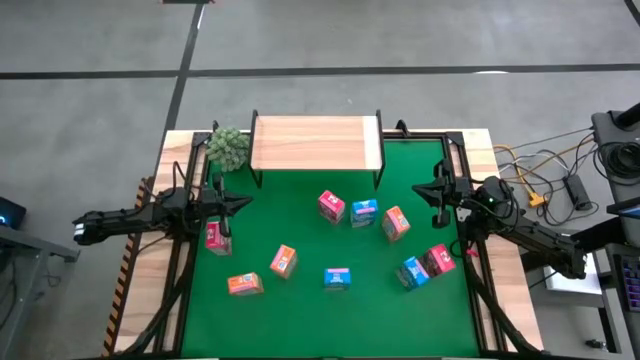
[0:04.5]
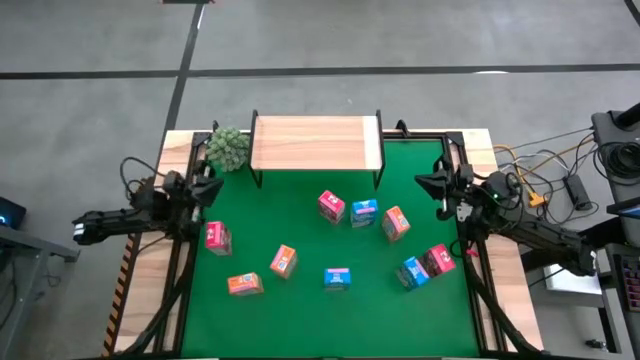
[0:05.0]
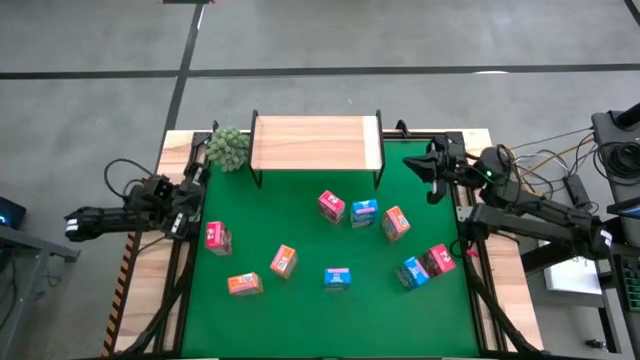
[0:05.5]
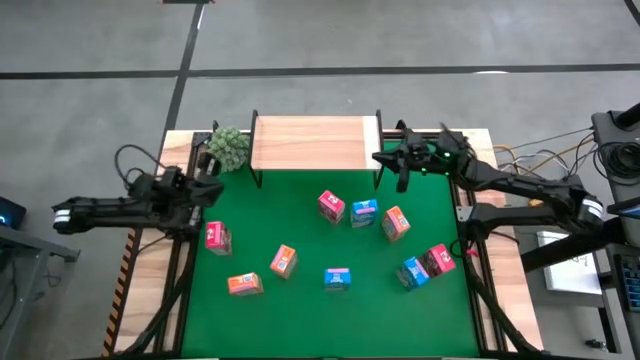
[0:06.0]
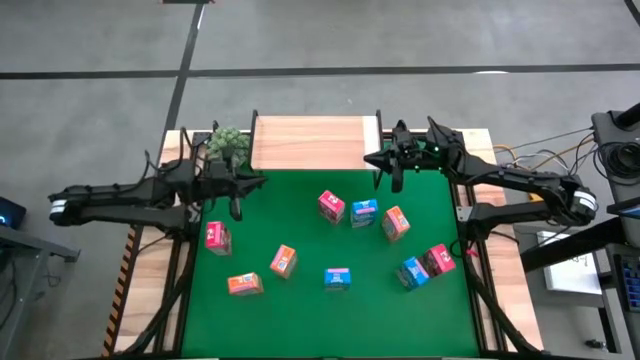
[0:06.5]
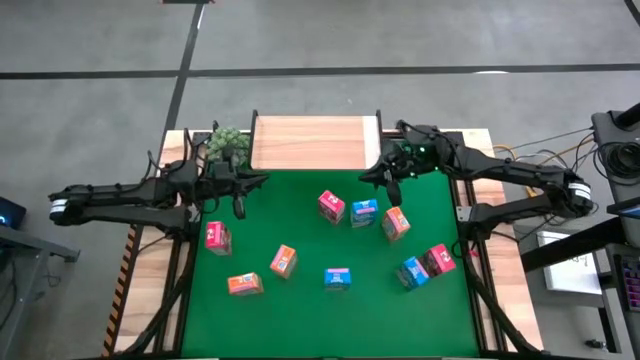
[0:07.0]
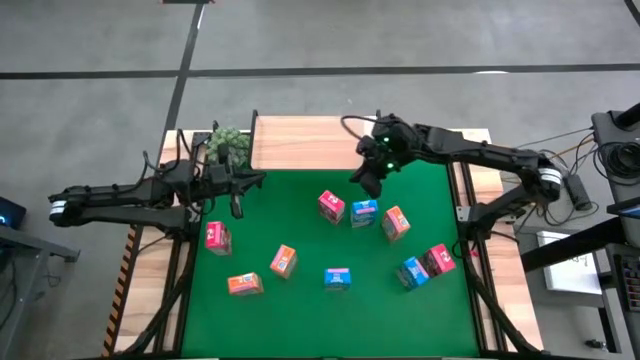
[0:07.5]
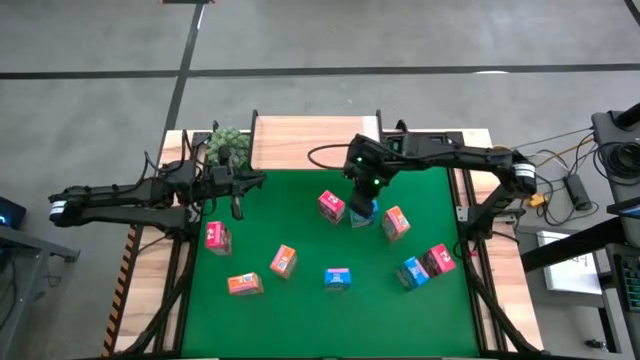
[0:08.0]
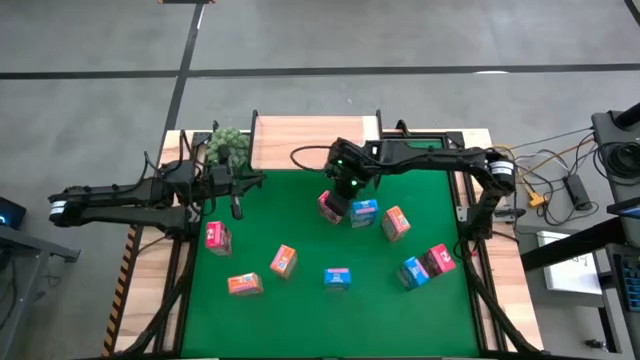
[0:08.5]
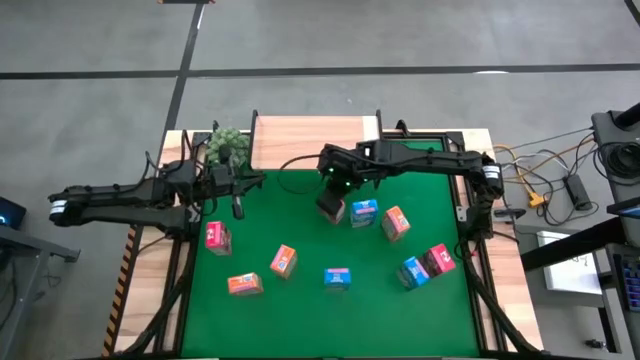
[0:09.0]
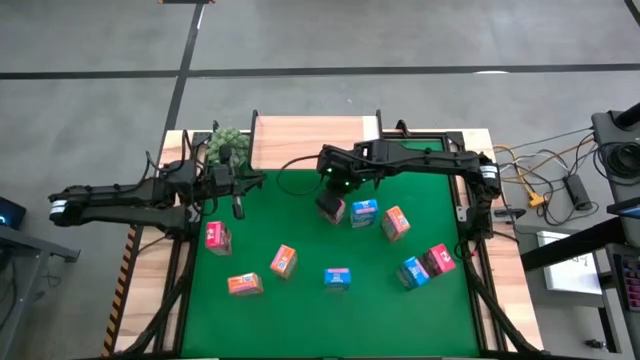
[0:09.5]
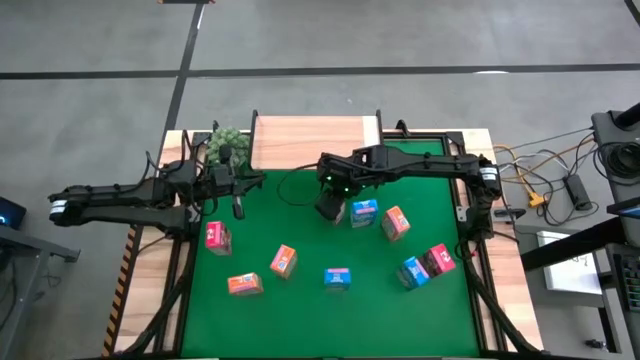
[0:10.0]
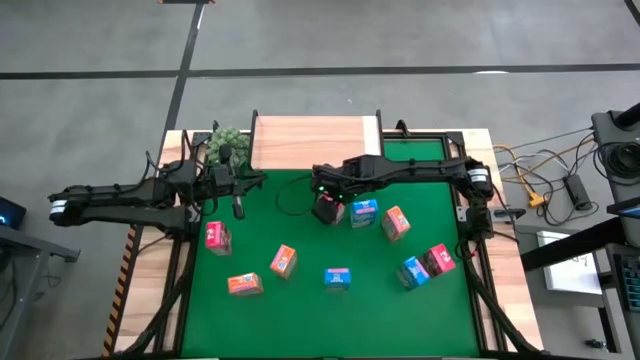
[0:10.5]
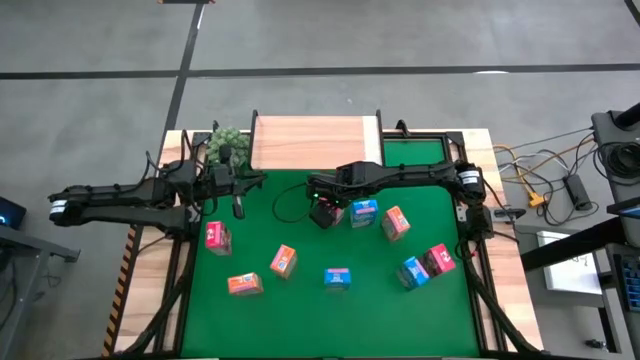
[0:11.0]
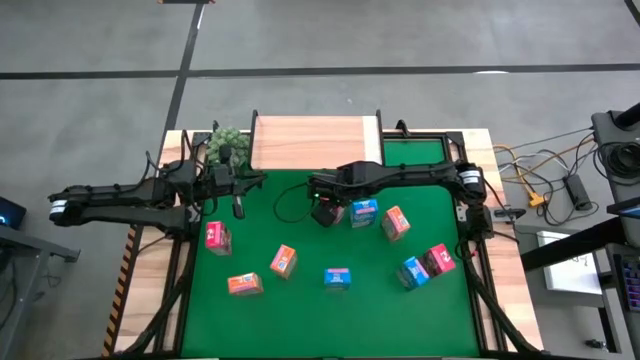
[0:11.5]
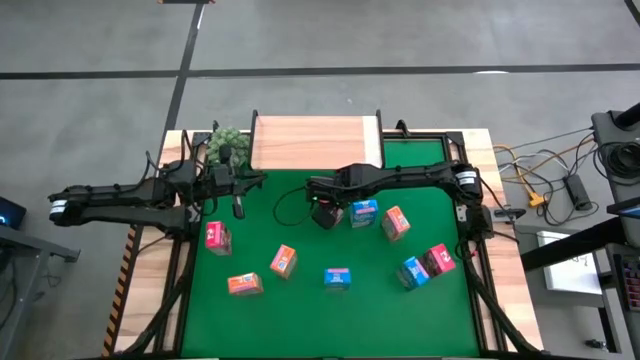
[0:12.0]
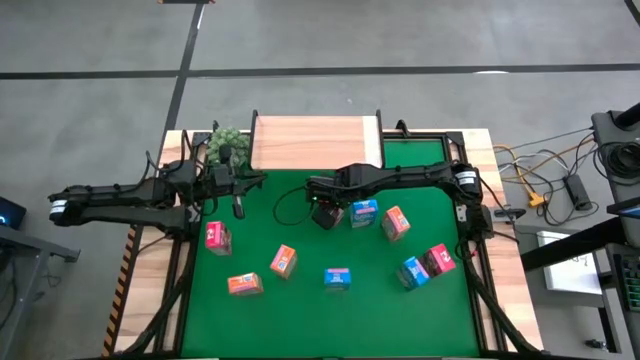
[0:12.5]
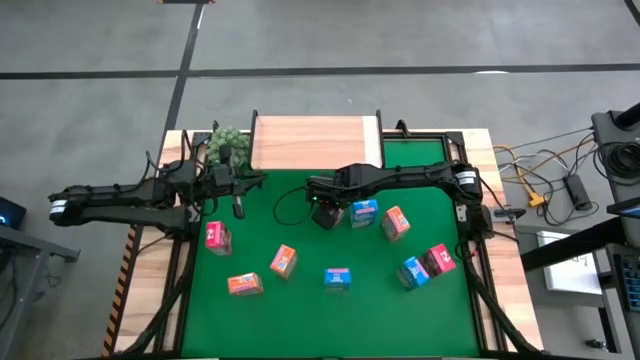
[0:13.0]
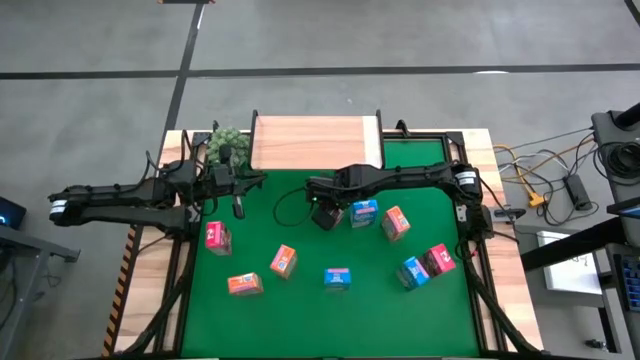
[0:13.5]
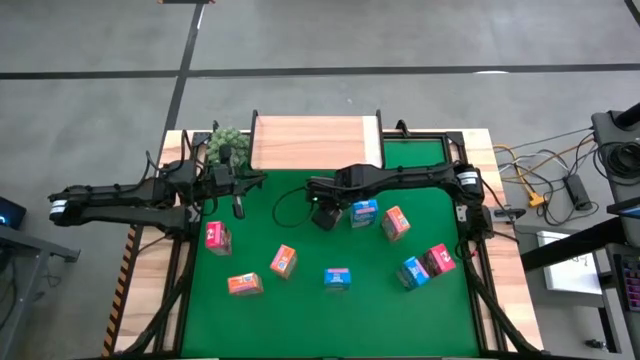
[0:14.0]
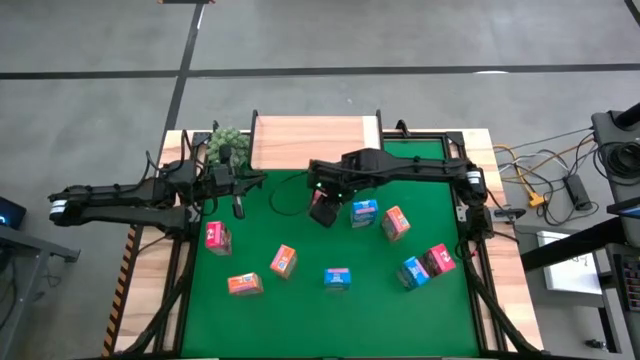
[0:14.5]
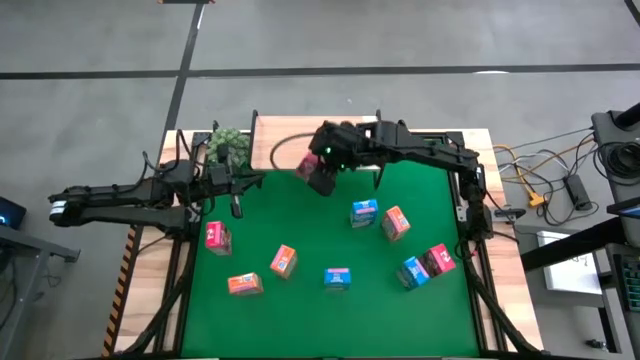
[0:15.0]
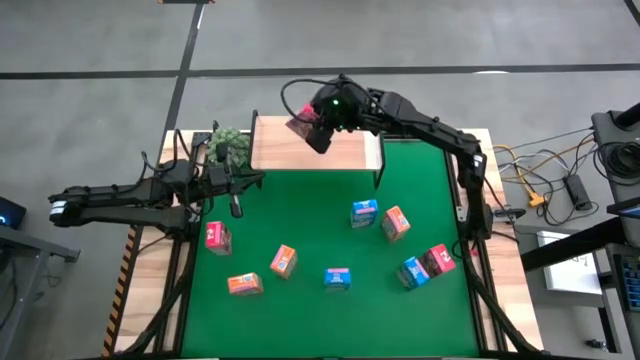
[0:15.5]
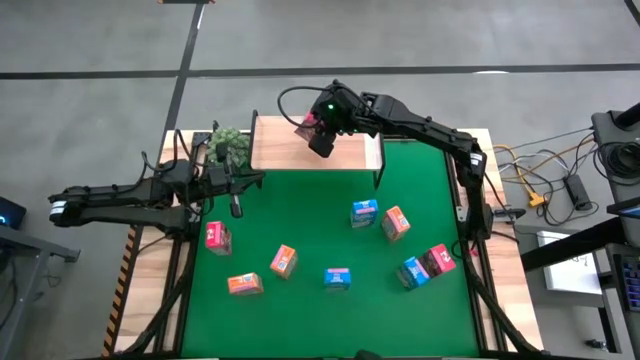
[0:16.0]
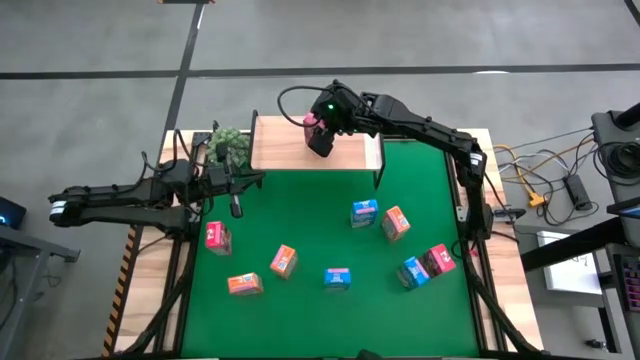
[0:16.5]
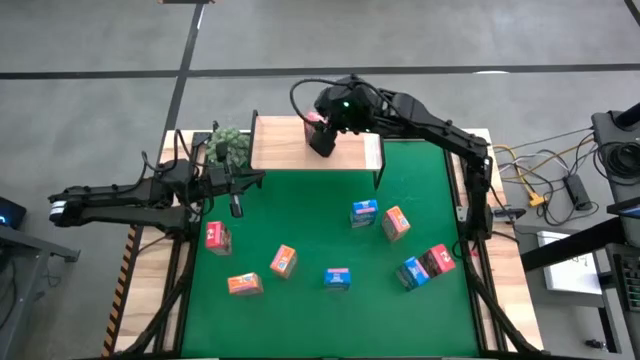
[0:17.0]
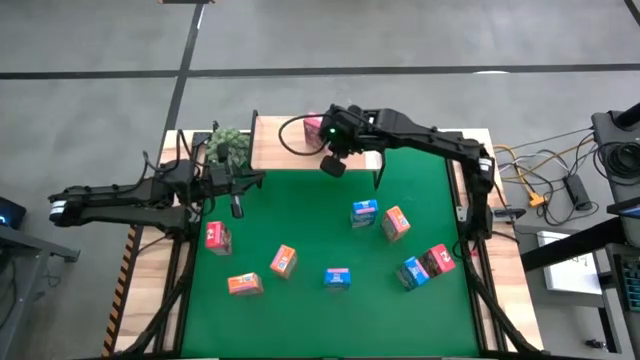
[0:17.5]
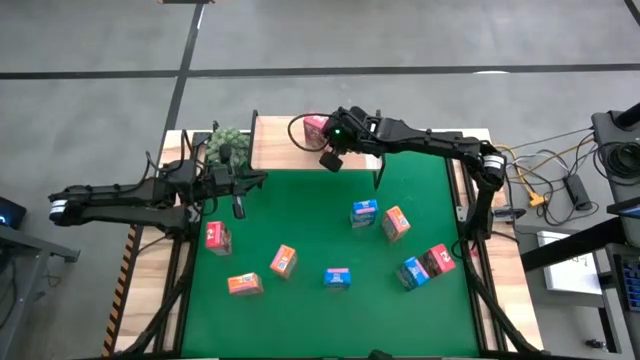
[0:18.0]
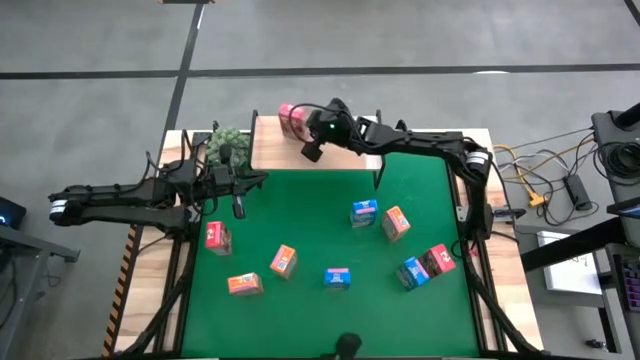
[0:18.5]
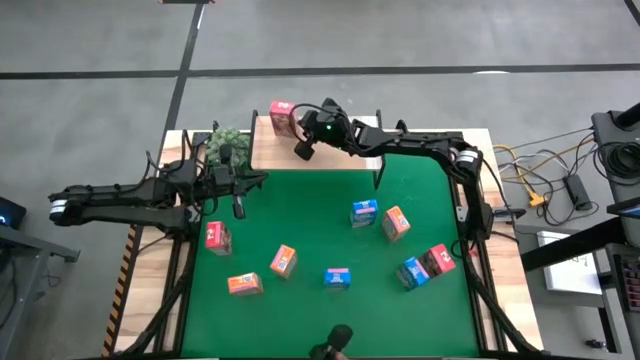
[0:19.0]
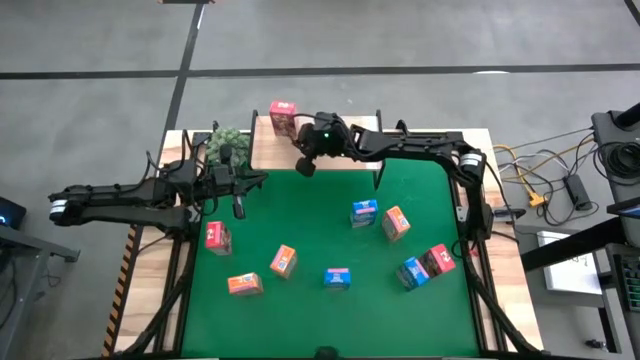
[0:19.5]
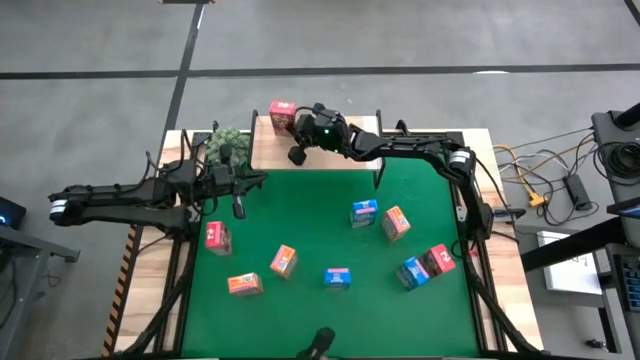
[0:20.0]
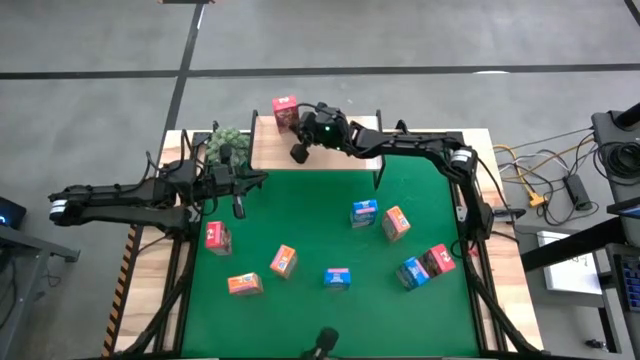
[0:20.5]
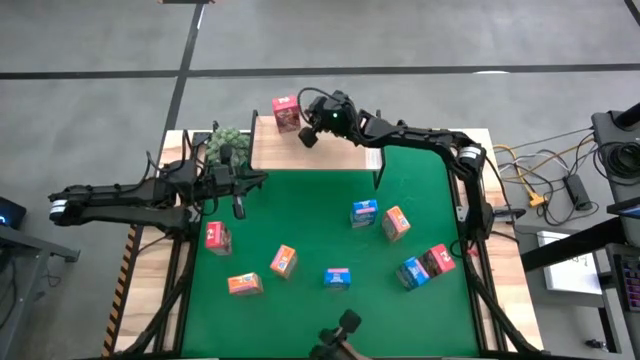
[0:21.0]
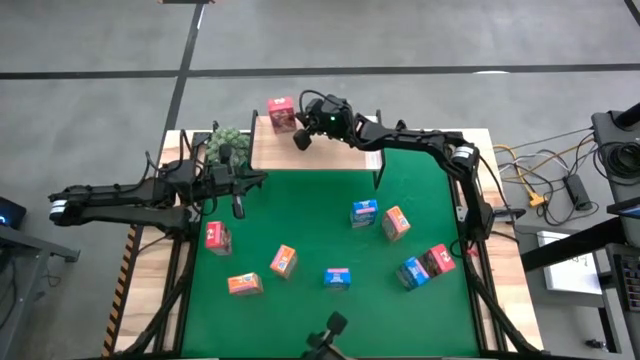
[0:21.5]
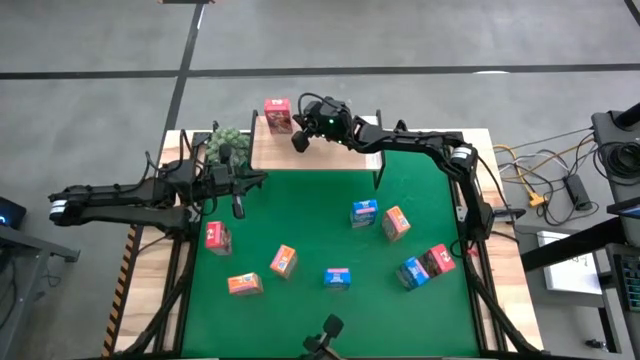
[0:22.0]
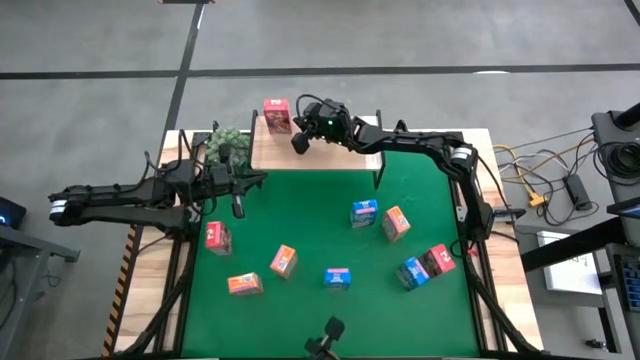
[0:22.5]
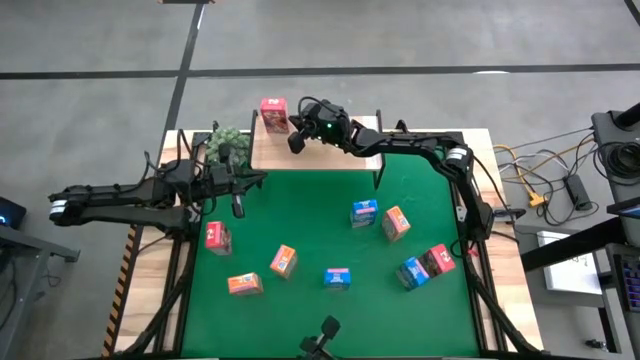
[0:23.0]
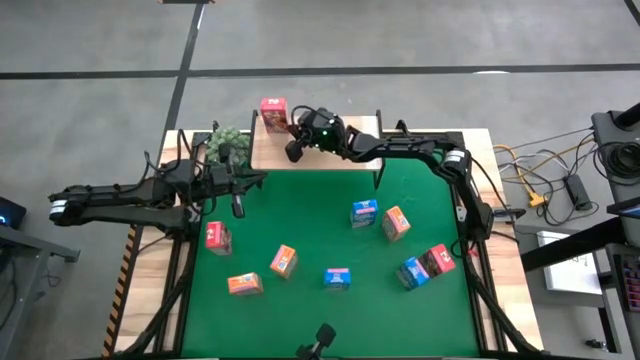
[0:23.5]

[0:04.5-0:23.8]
Task: Stack cereal on shelf
Put the top middle red cereal box on the shelf
